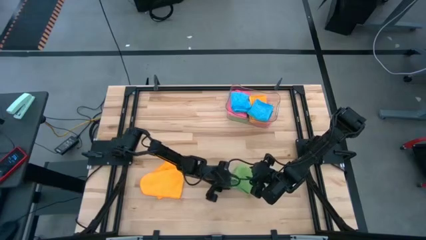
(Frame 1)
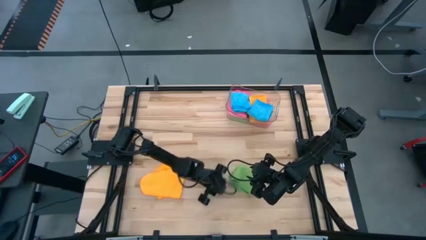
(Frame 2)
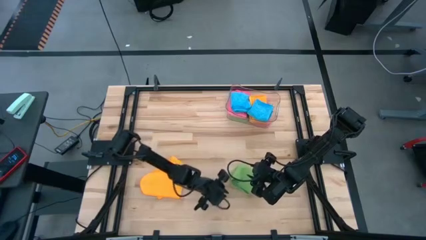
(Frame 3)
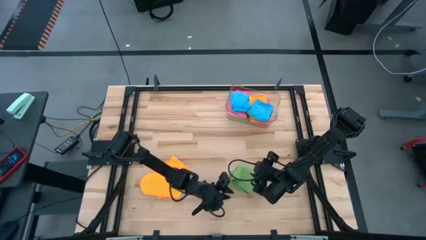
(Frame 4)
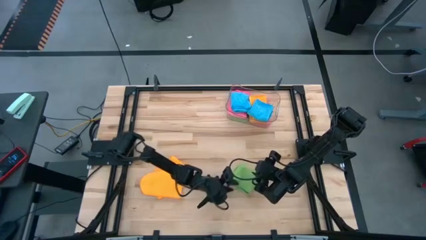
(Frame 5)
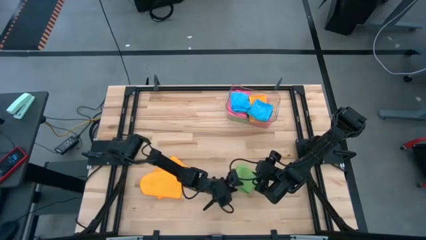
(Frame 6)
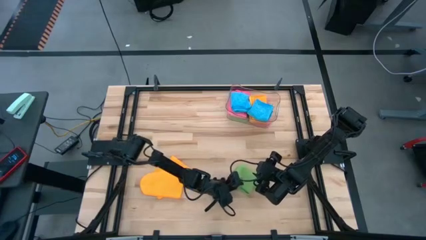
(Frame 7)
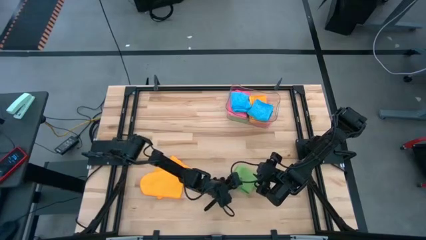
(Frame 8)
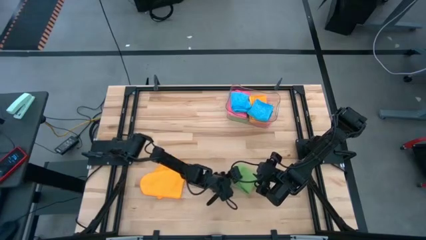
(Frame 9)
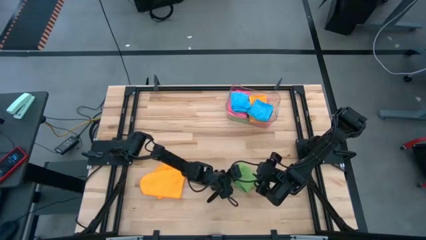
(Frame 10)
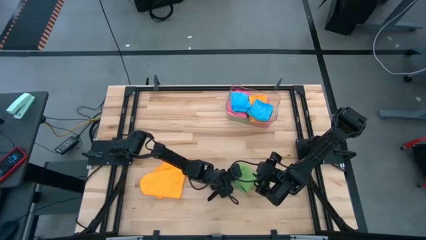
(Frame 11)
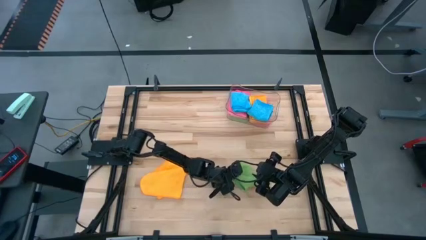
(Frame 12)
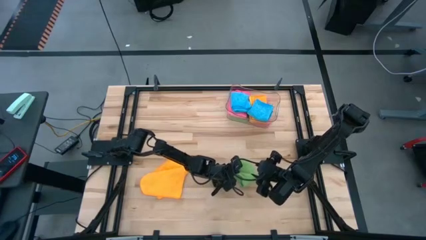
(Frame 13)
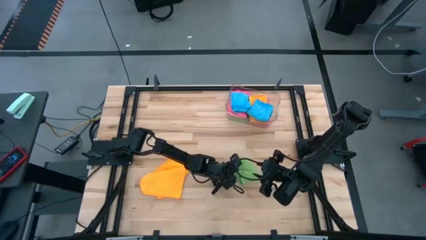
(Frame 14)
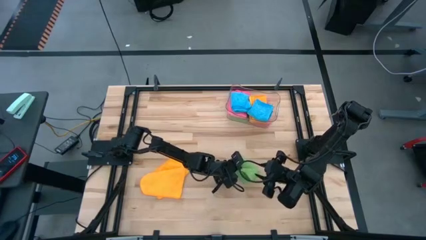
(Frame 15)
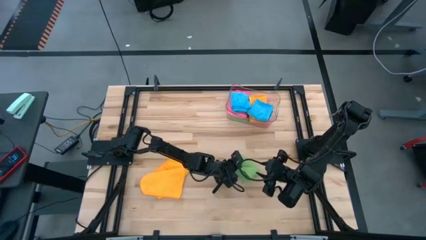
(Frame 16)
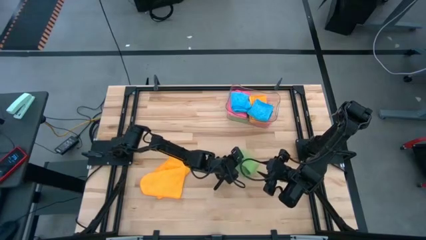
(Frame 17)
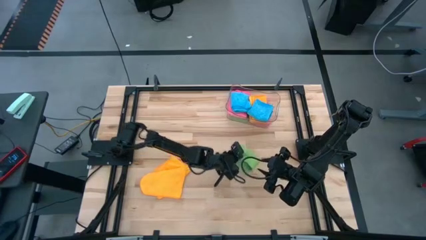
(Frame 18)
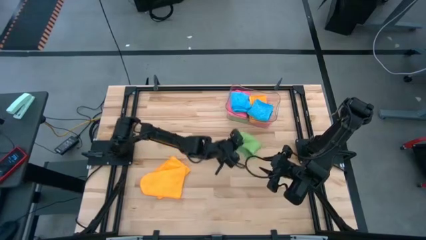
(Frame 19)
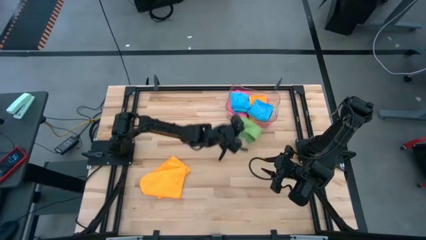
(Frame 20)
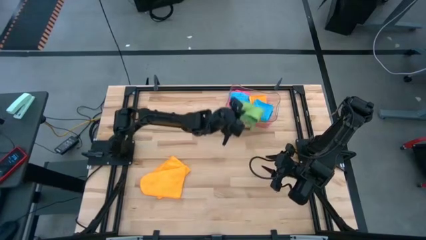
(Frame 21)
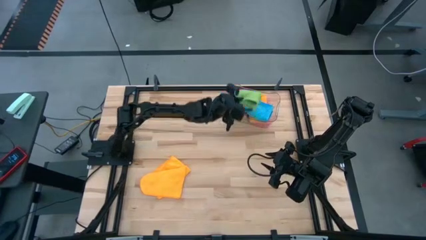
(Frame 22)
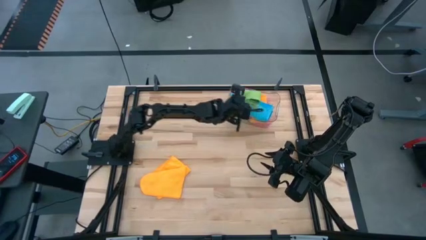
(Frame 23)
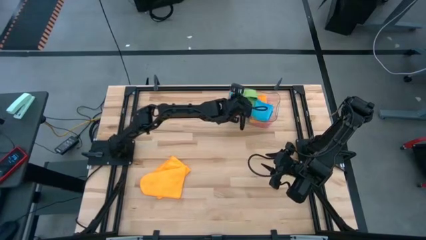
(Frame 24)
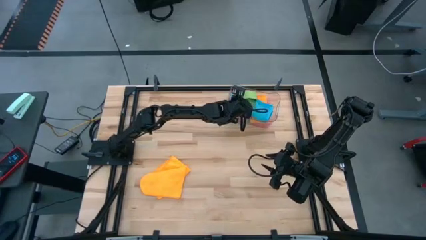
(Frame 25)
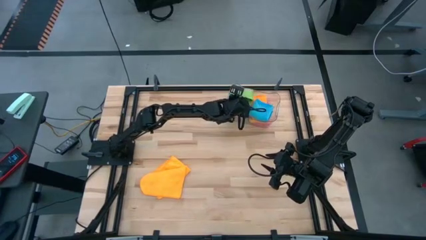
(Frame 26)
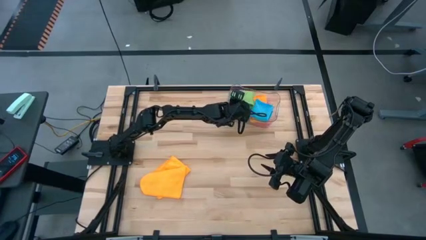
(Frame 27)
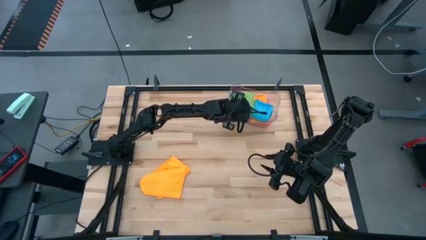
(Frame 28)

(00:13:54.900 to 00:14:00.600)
Task: Fold microfiber towels
Stack the green towel on top of the blue towel

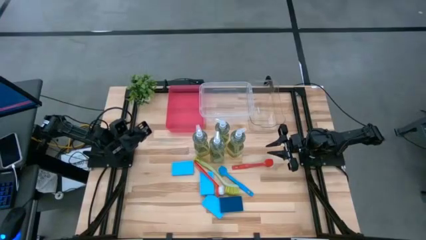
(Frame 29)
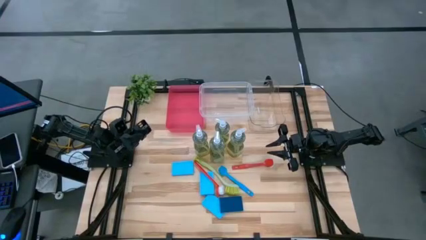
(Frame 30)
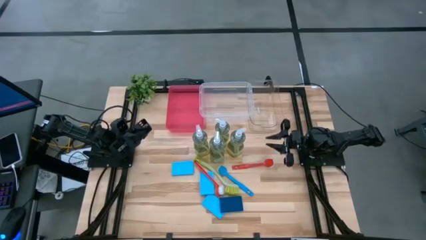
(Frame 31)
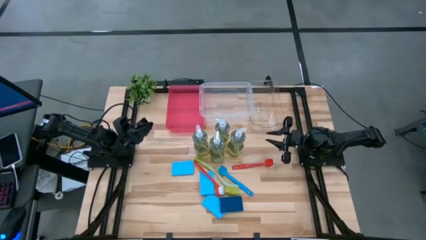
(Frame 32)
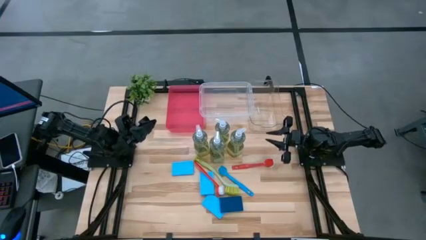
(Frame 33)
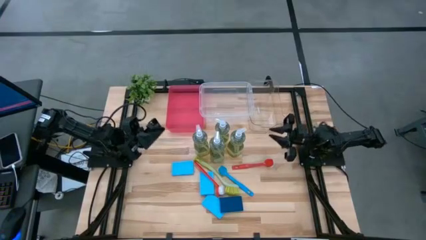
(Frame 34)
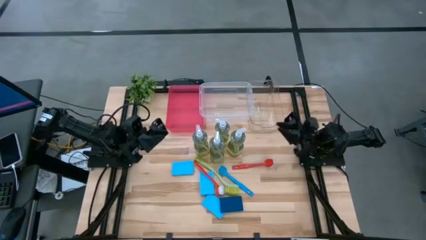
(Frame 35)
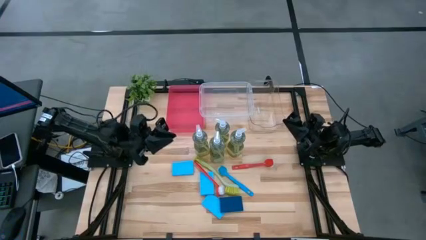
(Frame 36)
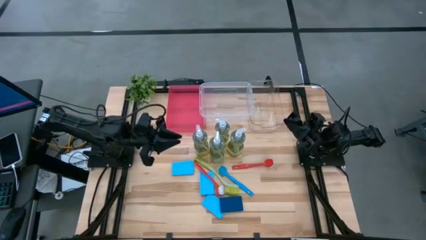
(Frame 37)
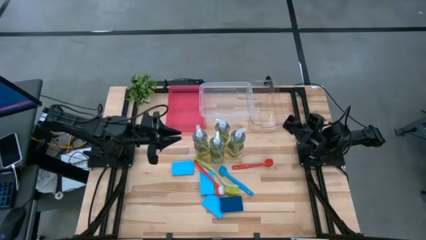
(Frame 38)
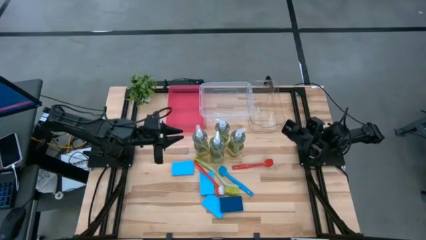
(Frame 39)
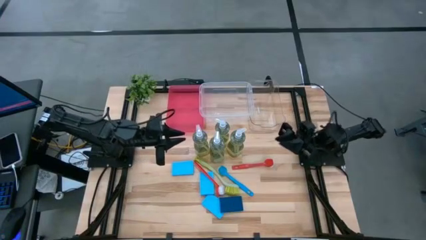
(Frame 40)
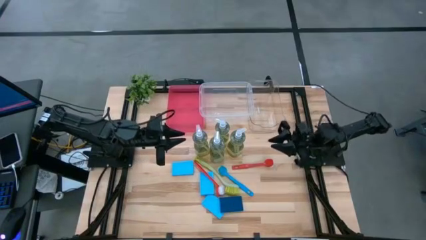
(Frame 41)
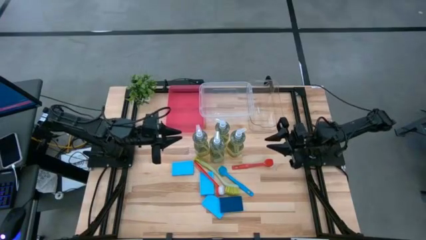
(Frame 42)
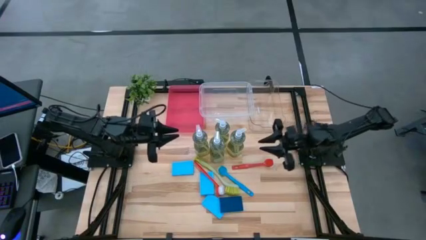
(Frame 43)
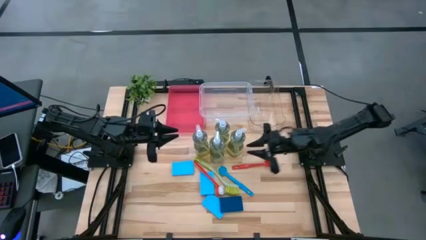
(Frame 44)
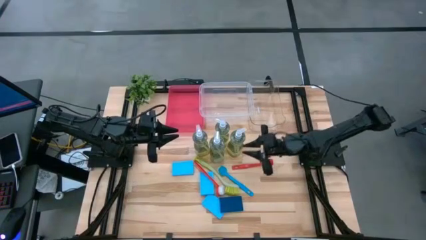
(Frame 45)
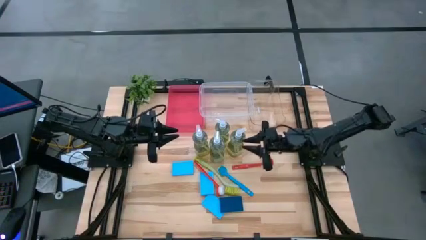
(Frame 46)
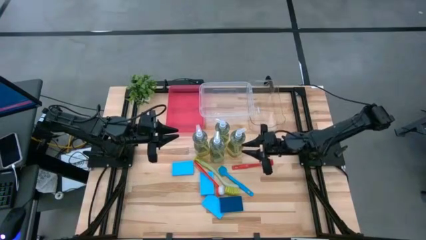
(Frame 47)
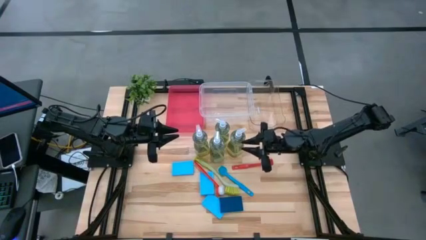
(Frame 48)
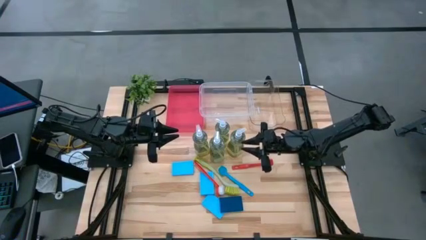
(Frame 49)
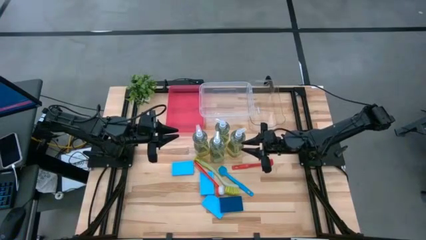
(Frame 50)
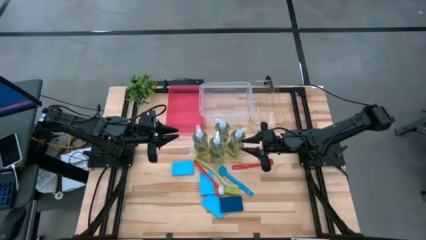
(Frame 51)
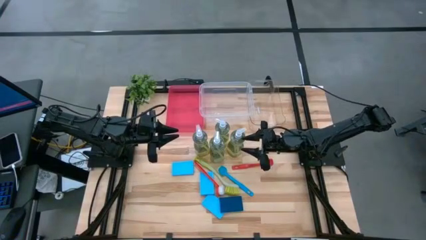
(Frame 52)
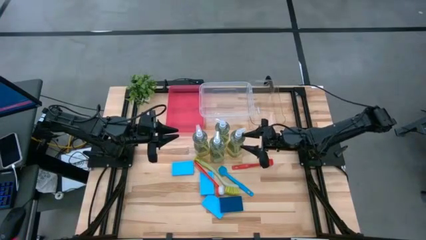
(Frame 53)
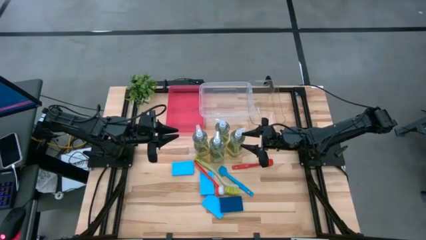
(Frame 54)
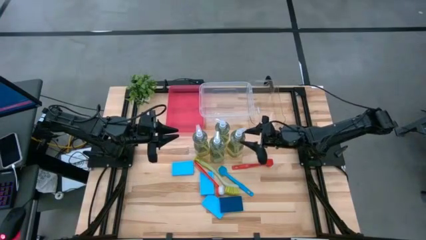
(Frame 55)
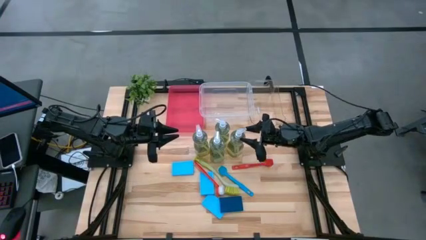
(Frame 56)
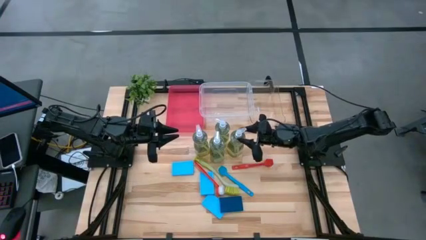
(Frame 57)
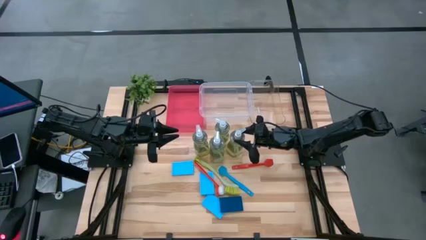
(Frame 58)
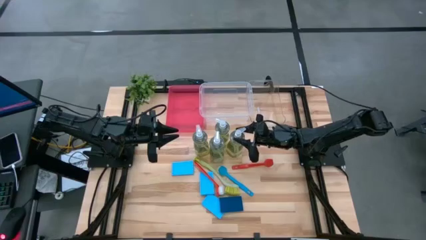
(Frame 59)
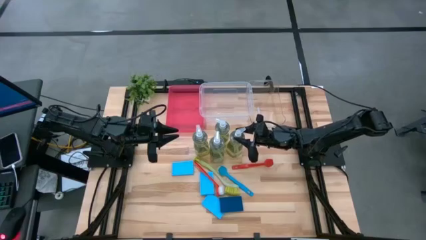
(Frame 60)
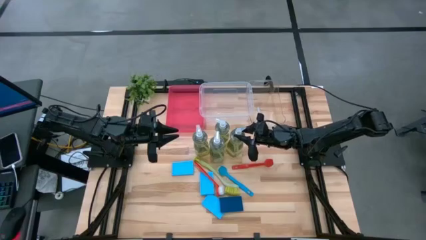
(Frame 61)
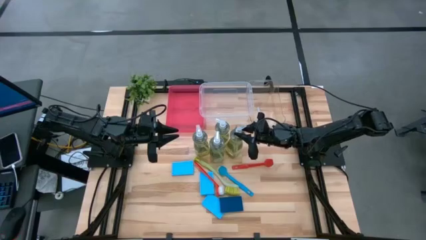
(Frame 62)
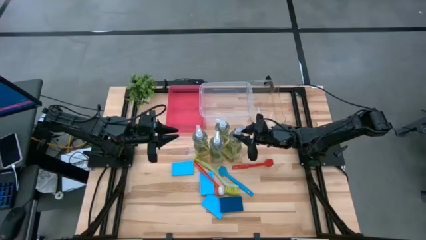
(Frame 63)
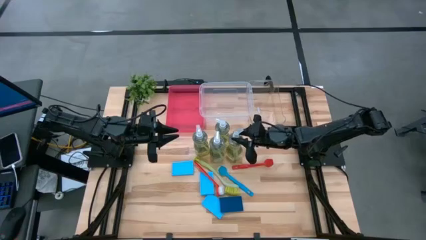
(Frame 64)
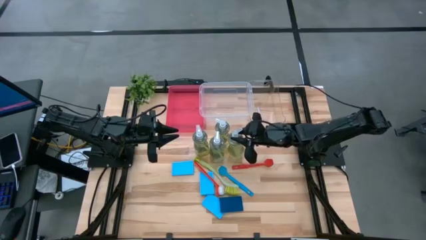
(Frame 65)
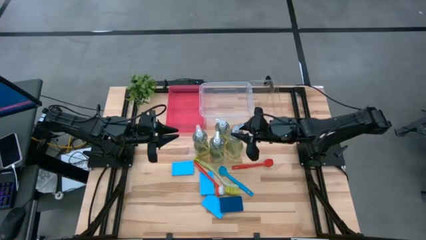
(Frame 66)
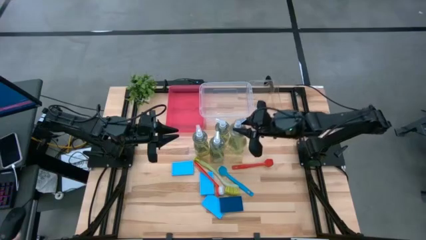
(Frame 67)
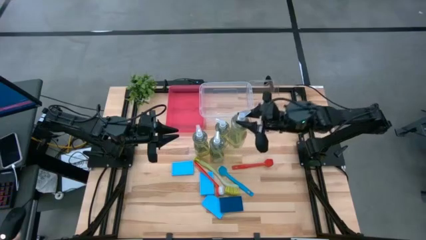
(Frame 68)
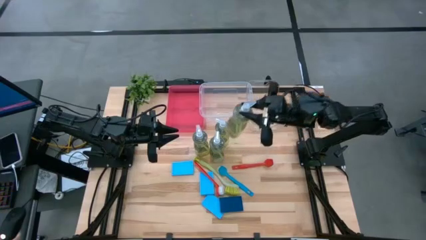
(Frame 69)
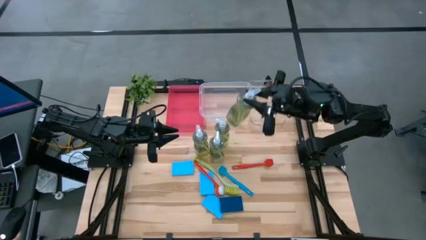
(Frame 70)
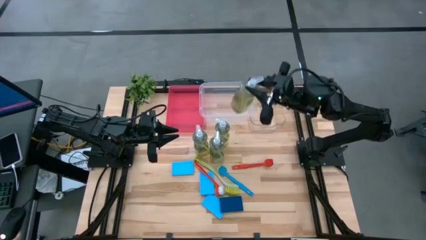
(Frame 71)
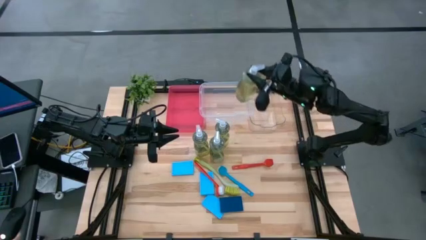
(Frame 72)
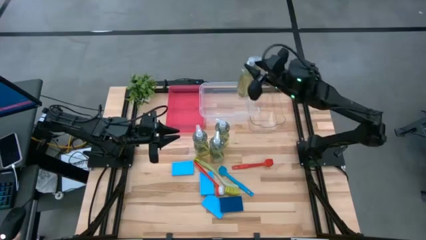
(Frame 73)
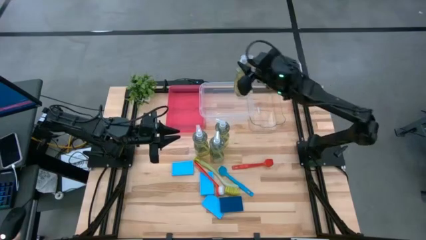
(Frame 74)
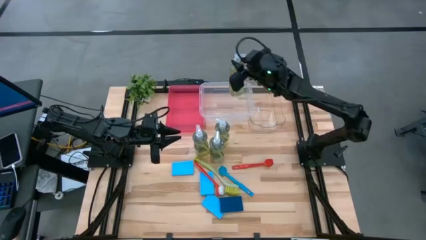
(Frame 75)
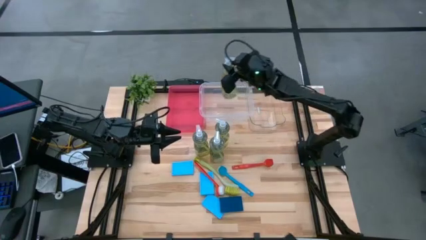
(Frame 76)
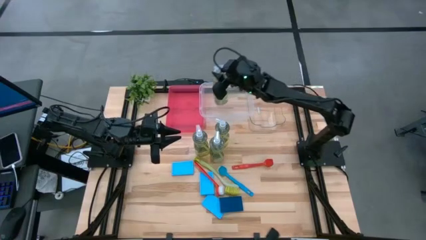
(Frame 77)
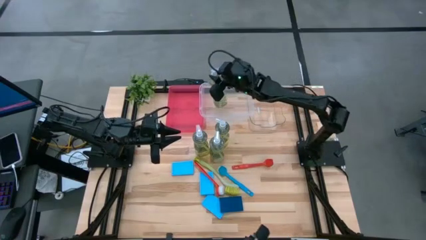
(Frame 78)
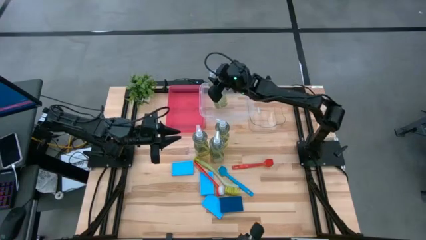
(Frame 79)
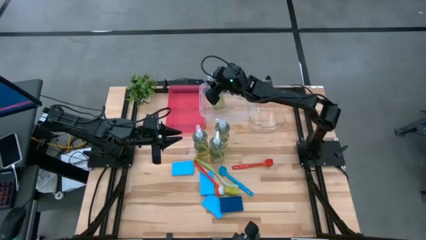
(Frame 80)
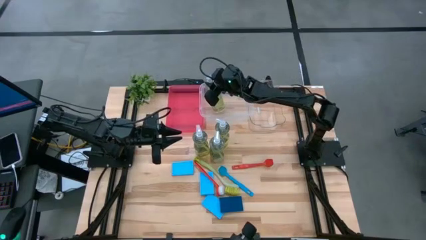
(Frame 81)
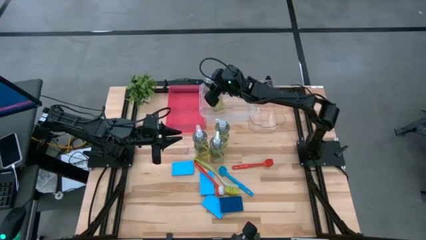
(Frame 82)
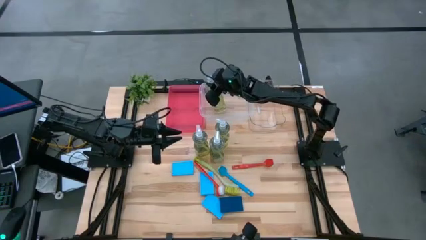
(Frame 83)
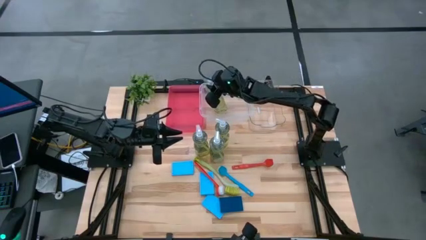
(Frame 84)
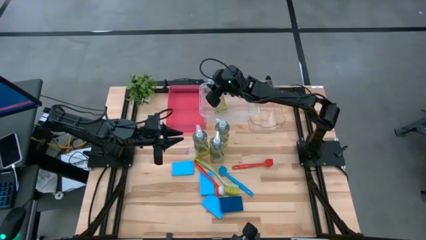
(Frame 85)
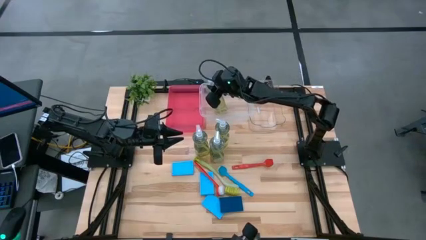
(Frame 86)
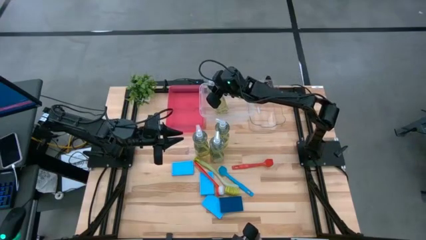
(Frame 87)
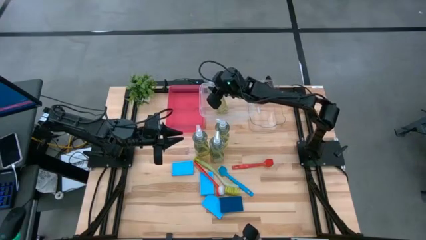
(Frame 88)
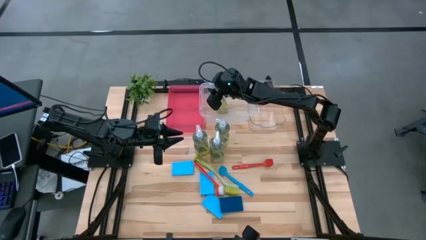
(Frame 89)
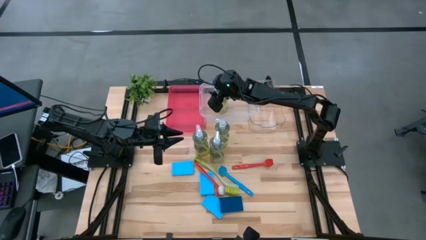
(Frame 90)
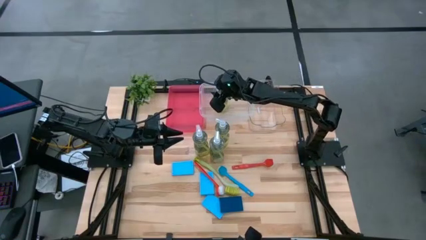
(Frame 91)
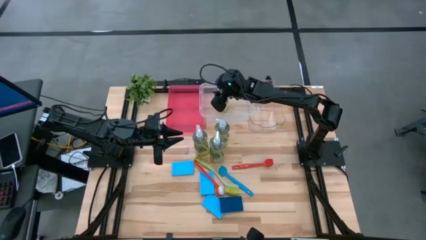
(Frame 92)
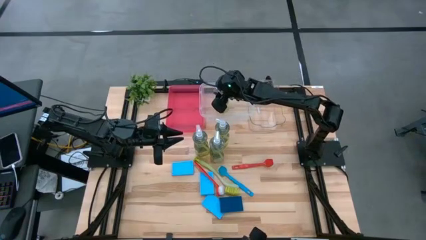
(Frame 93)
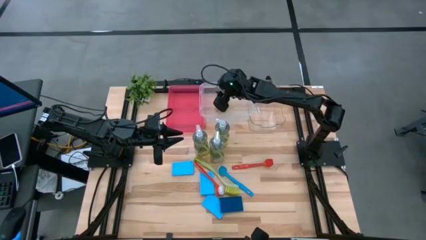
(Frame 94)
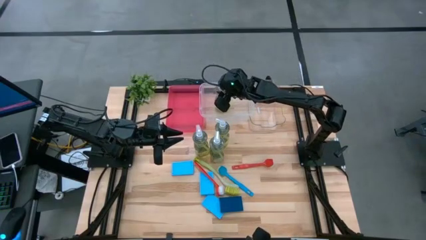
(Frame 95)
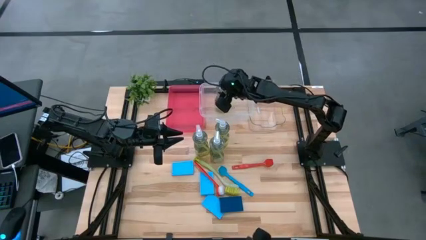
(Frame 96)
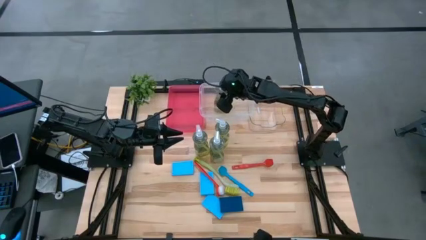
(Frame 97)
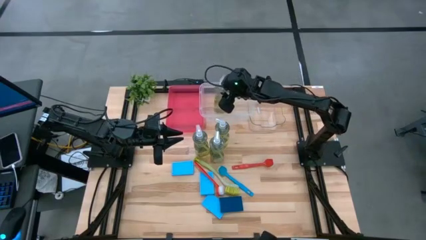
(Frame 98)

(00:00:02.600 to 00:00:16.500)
Task: Pick & Place Kitchen Sink Supplies
Put the green dishwashing liquid into the white bin
